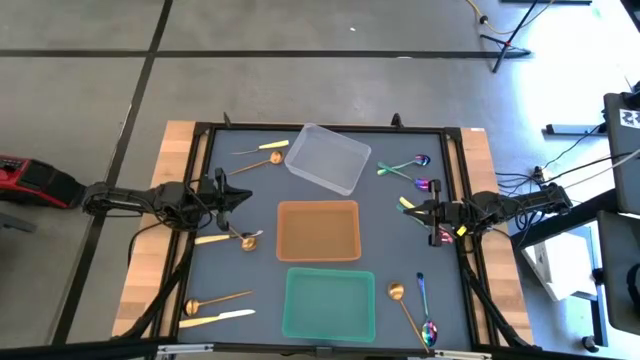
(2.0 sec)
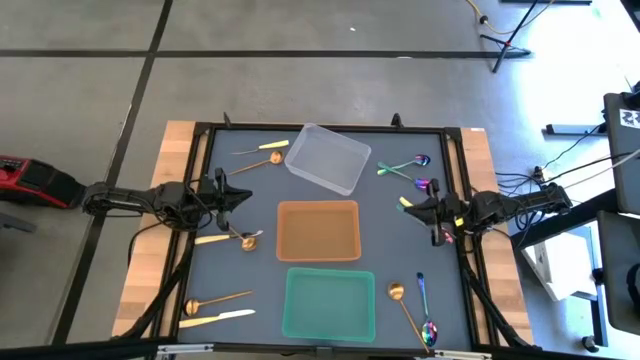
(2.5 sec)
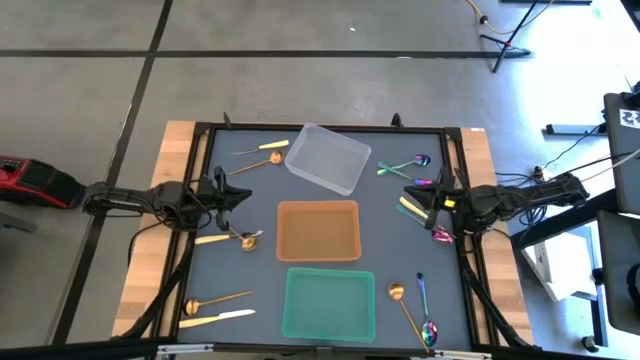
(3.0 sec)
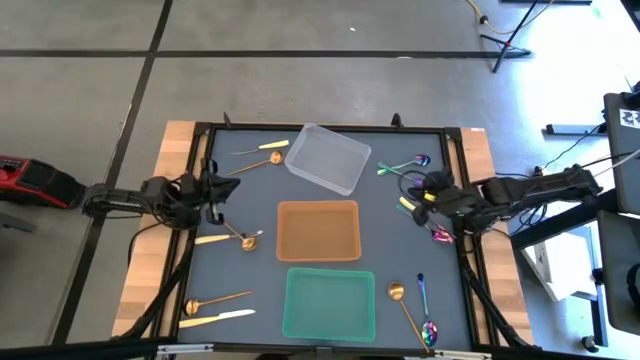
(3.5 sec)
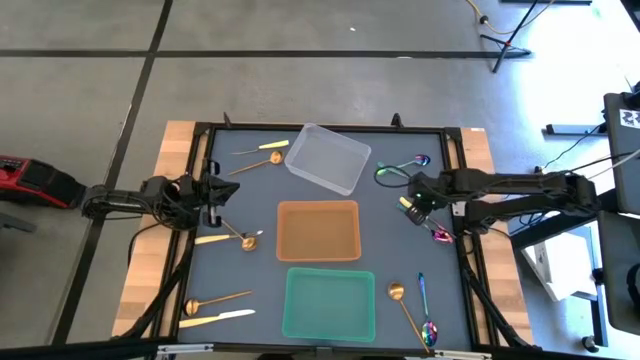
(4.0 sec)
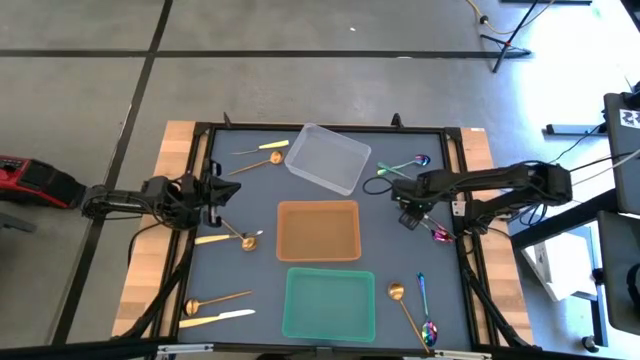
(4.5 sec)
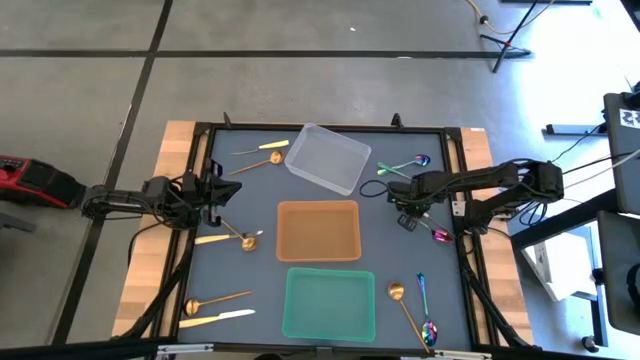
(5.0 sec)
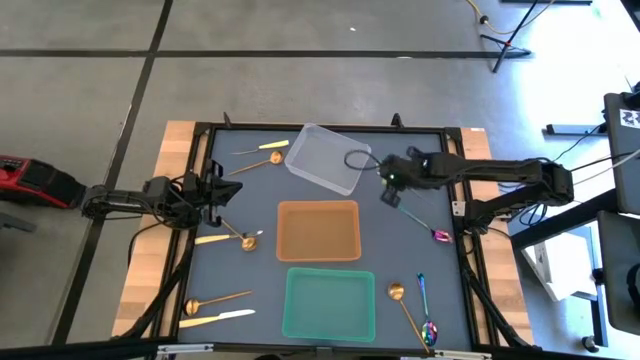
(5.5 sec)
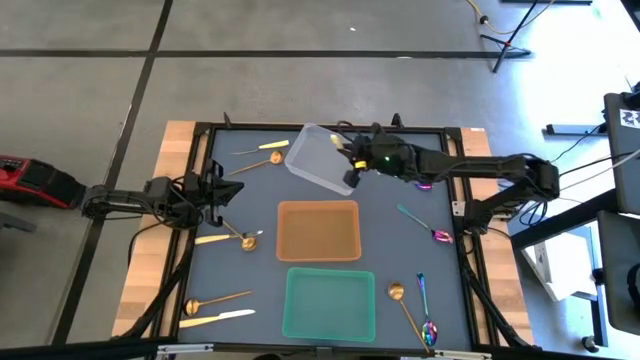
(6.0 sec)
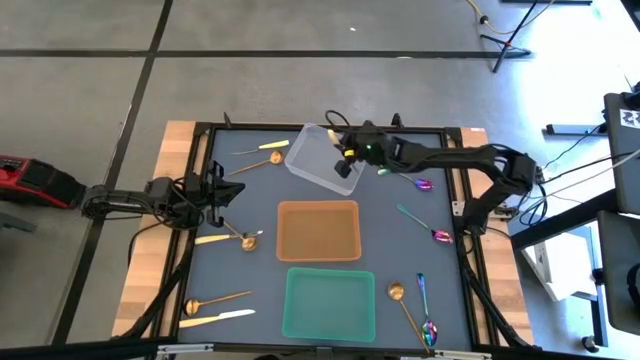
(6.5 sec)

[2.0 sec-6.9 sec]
Task: Sort silverware by color (type)
Put the yellow knife into the transparent bin

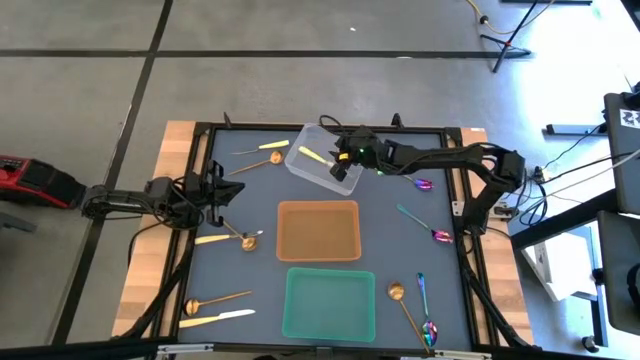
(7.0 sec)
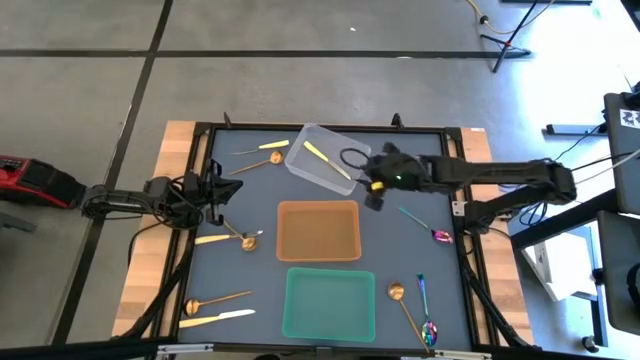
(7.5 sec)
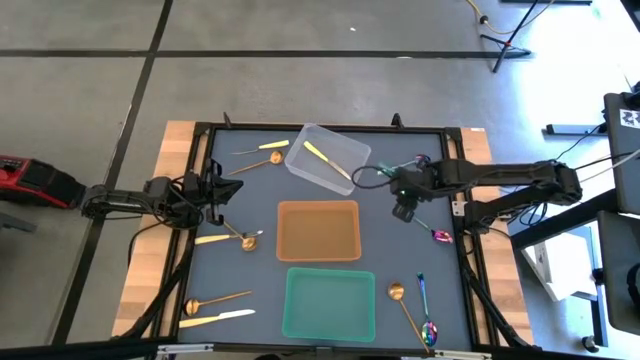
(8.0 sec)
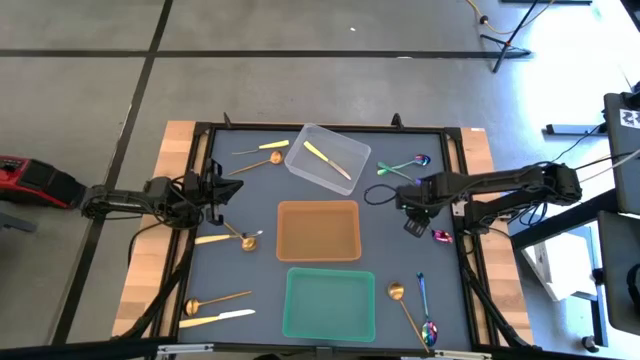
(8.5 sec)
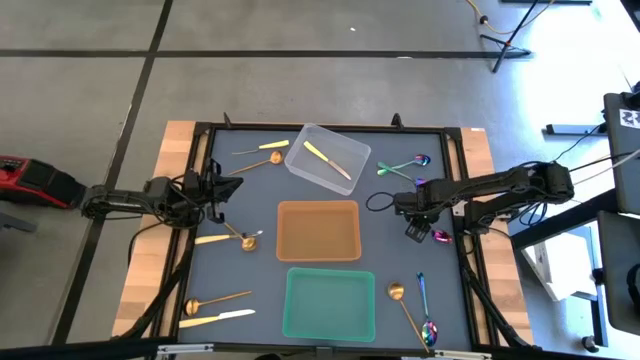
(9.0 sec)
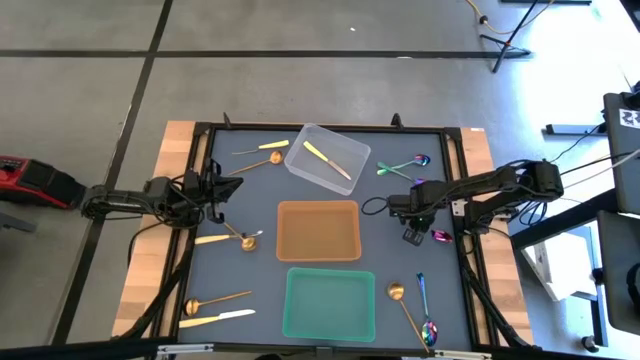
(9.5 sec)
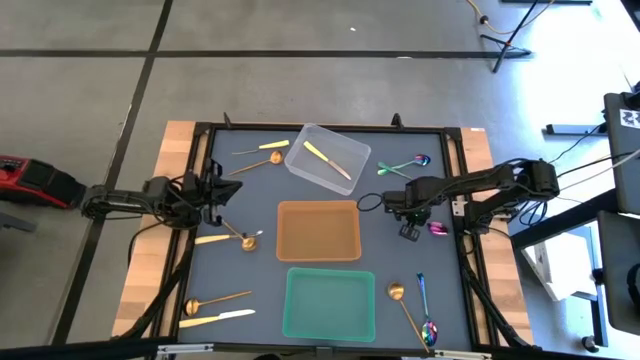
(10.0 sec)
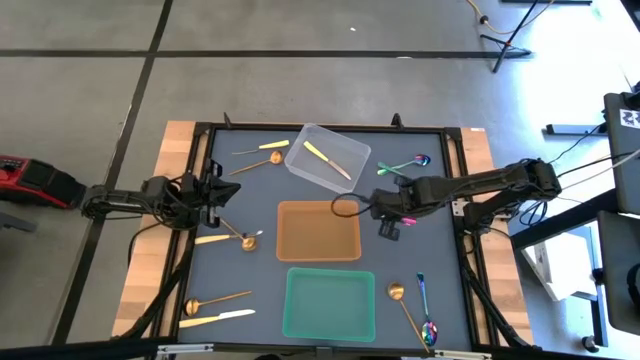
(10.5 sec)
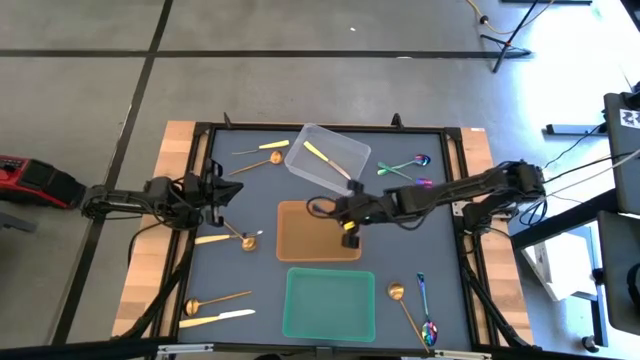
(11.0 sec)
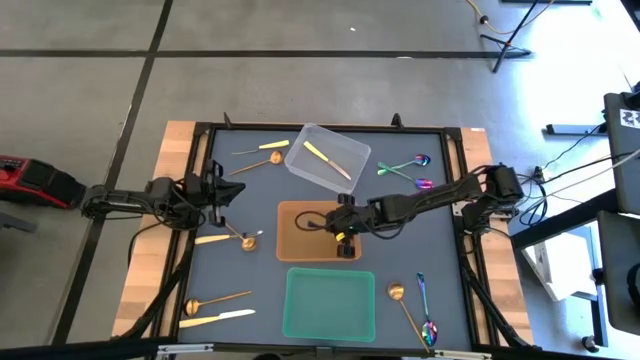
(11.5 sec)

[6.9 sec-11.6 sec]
Put the purple spoon into the orange bin

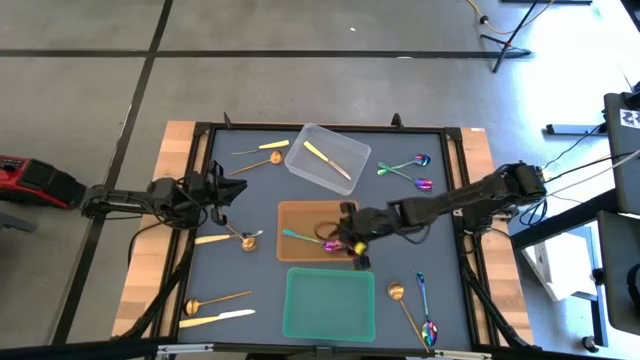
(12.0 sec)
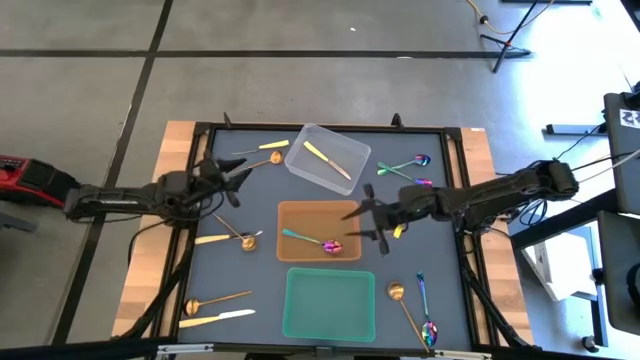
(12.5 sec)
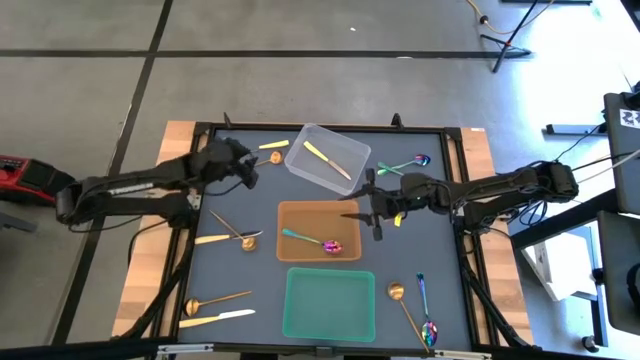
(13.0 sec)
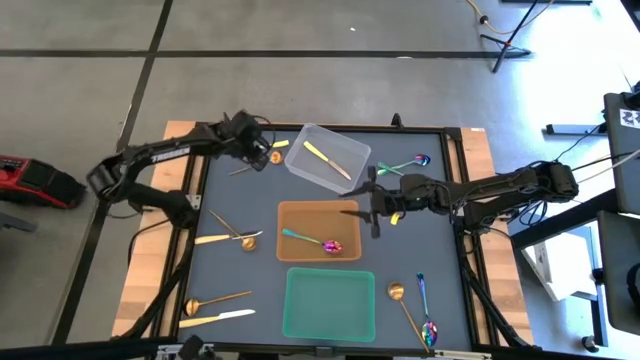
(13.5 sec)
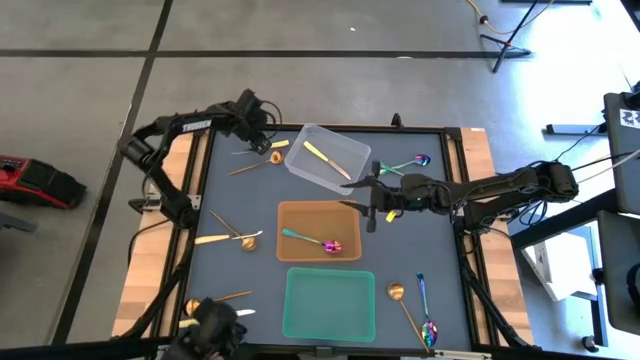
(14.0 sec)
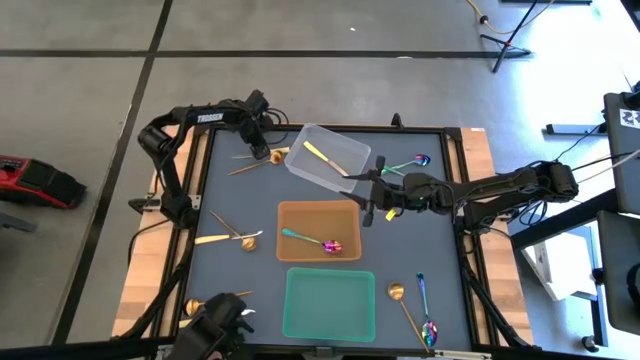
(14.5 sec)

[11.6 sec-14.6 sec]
Put the yellow knife into the transparent bin

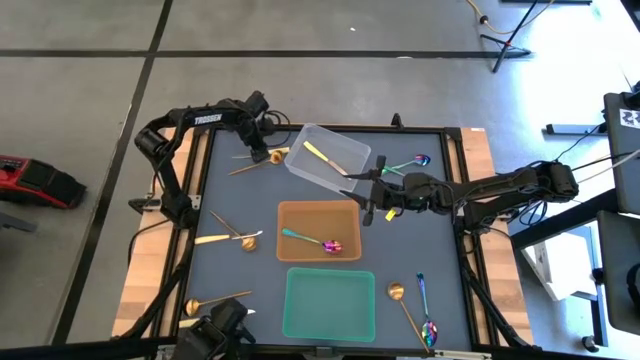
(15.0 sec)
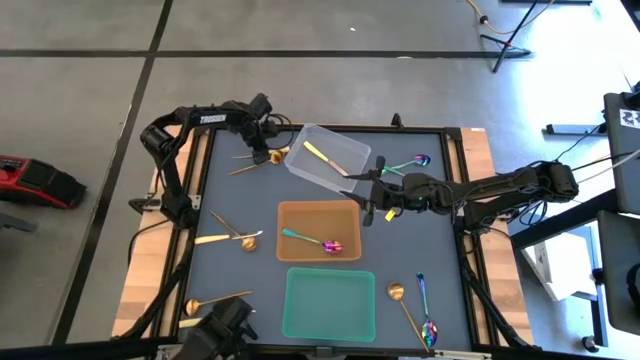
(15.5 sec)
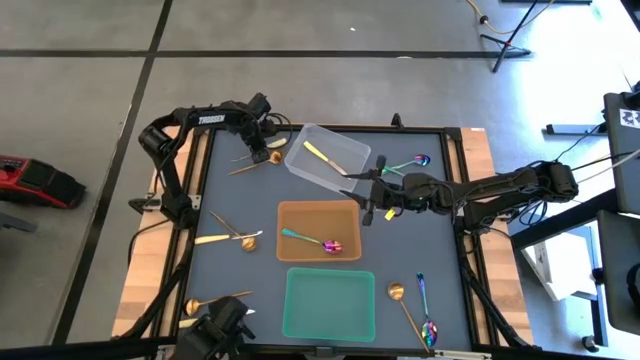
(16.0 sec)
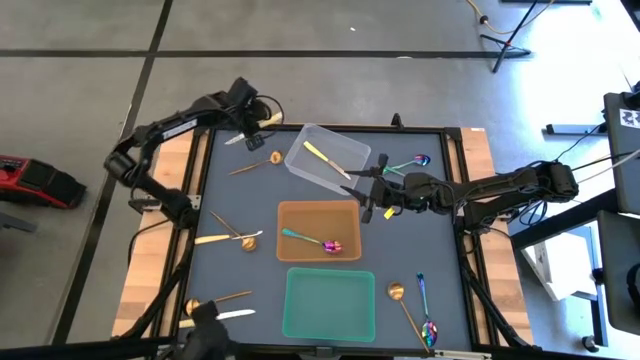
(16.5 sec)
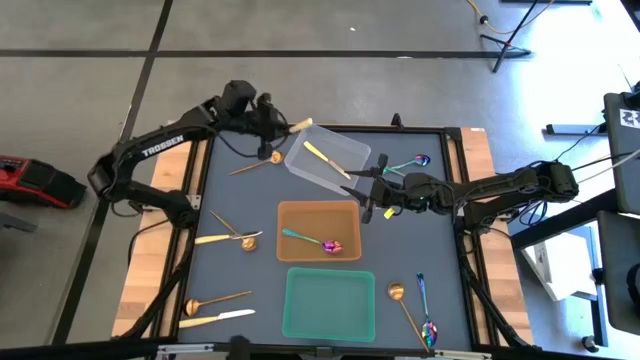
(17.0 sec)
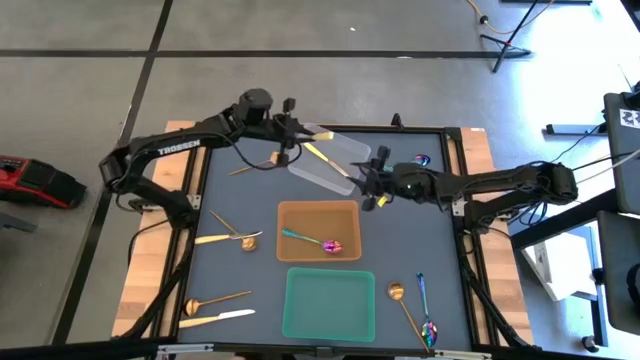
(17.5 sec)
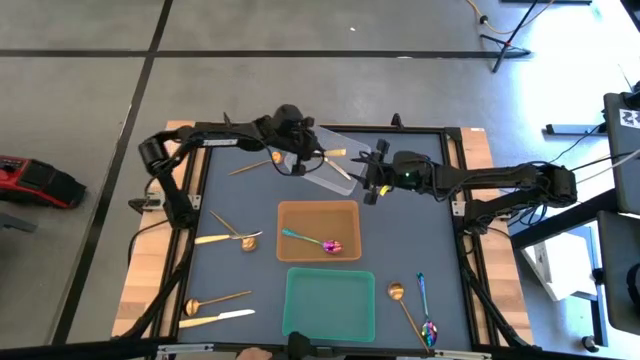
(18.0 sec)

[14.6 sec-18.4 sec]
Put the yellow knife into the transparent bin

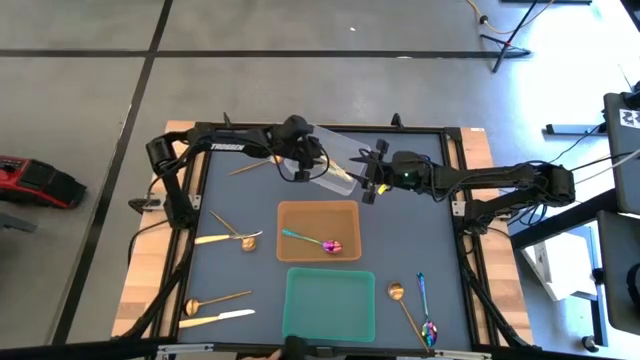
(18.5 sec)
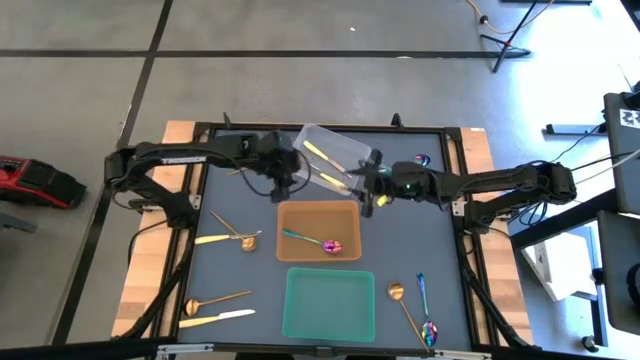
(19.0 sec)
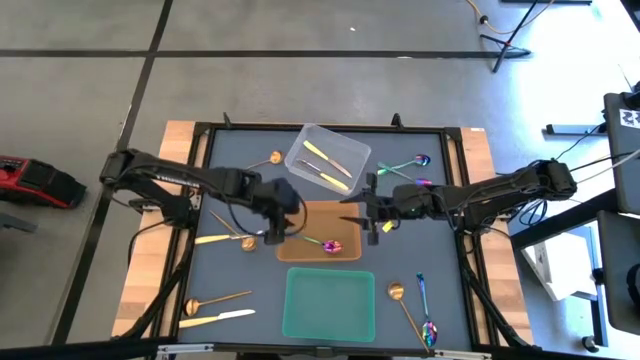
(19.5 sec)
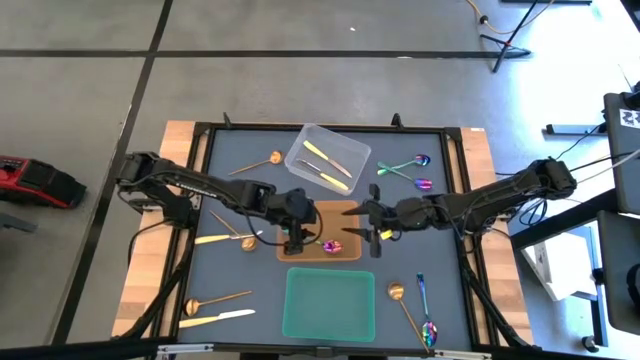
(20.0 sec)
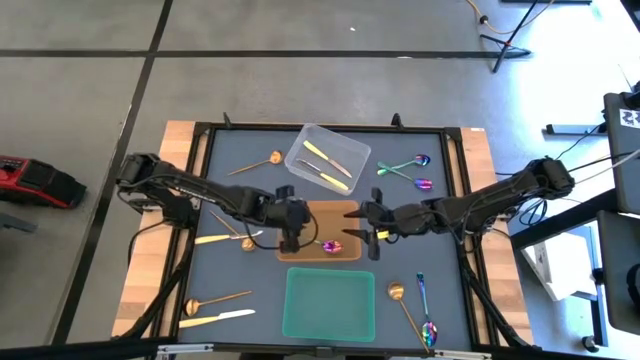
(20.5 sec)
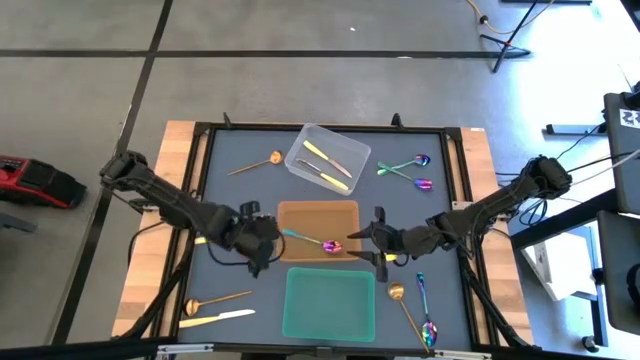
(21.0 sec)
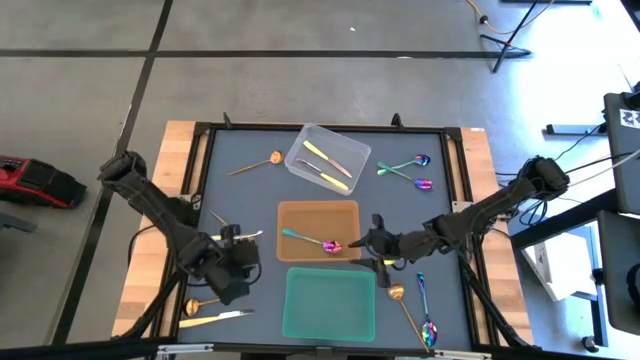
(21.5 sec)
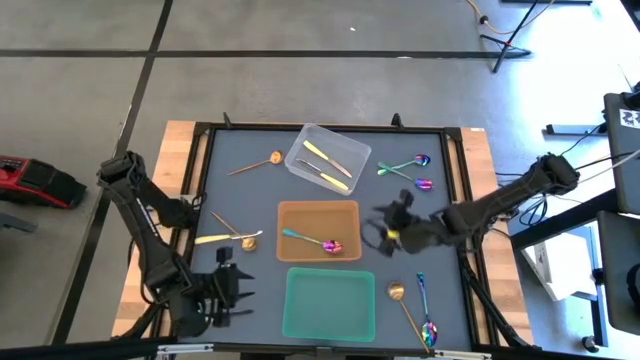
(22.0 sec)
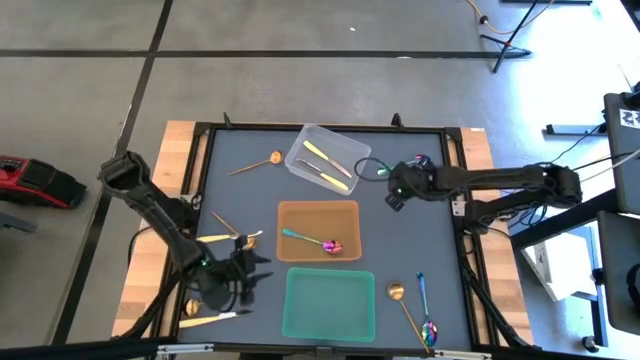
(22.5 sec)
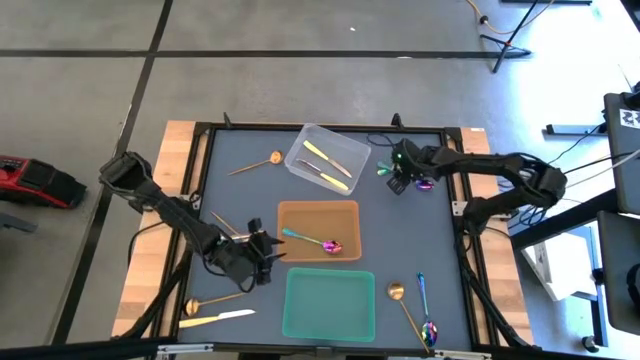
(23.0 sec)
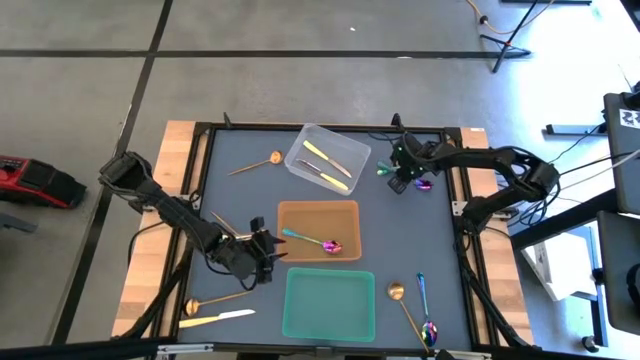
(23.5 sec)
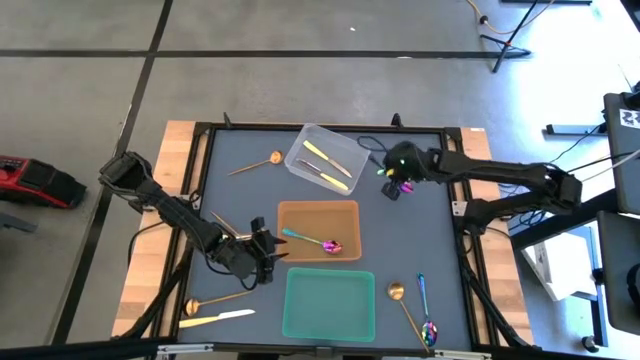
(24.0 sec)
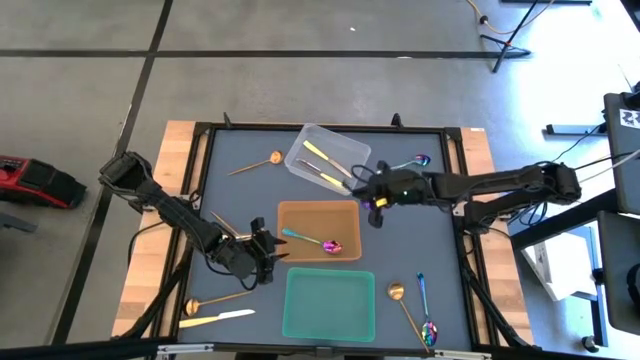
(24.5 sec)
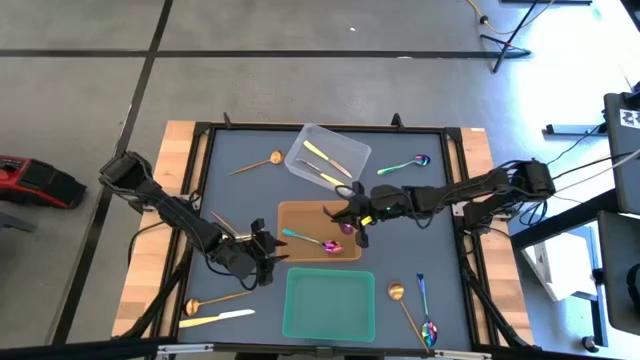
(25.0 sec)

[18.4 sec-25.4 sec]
Put the purple spoon into the orange bin
